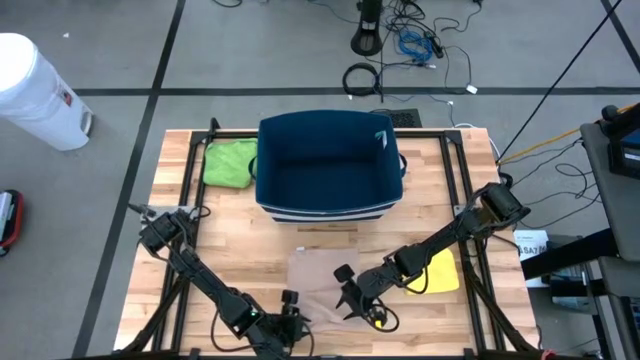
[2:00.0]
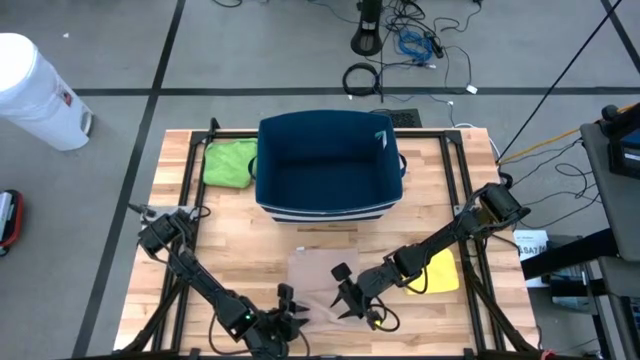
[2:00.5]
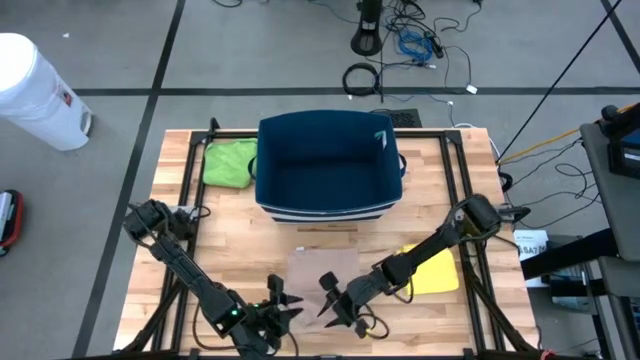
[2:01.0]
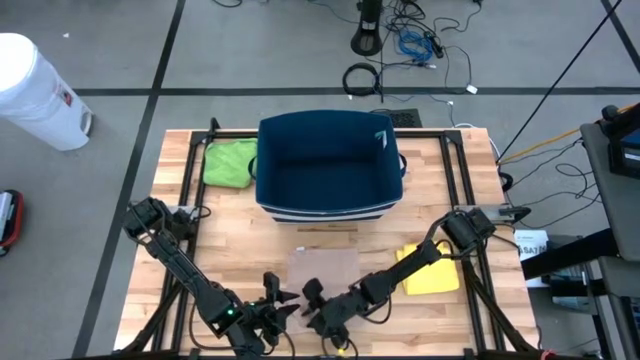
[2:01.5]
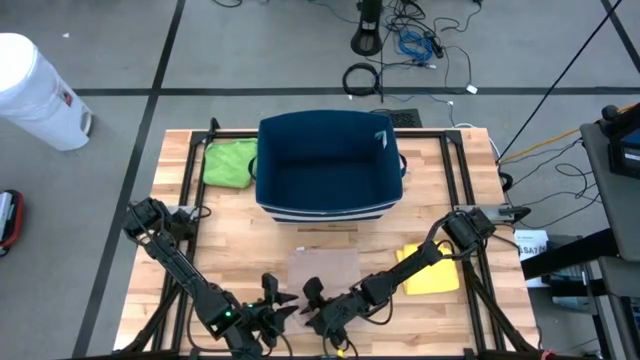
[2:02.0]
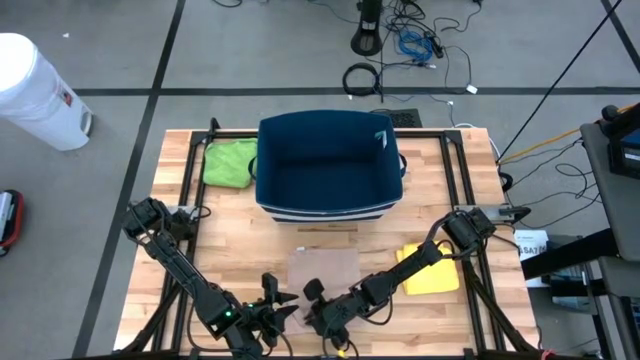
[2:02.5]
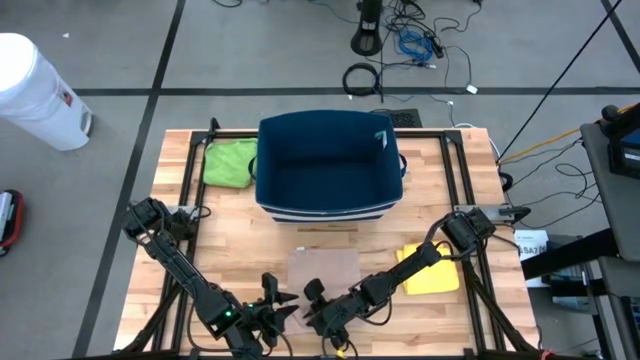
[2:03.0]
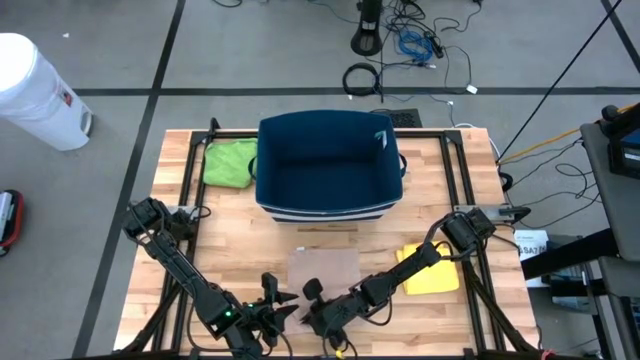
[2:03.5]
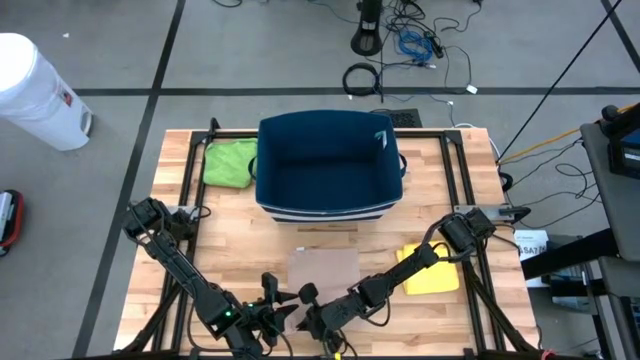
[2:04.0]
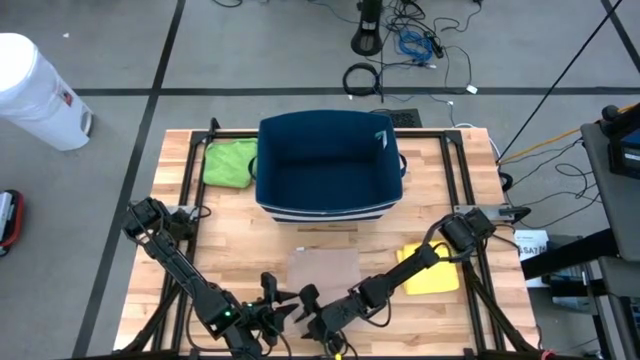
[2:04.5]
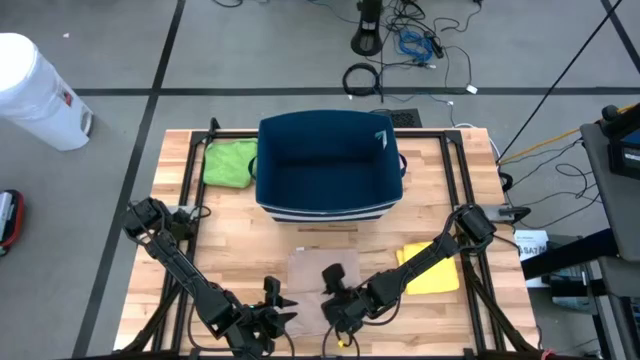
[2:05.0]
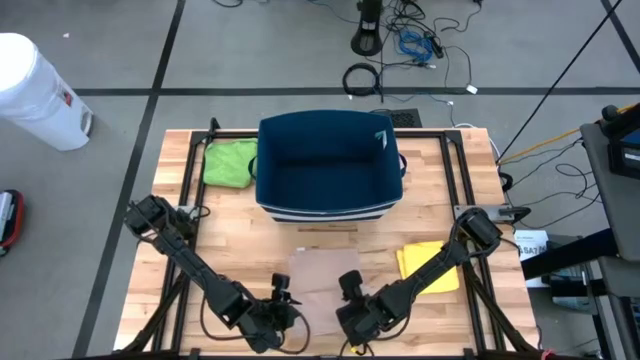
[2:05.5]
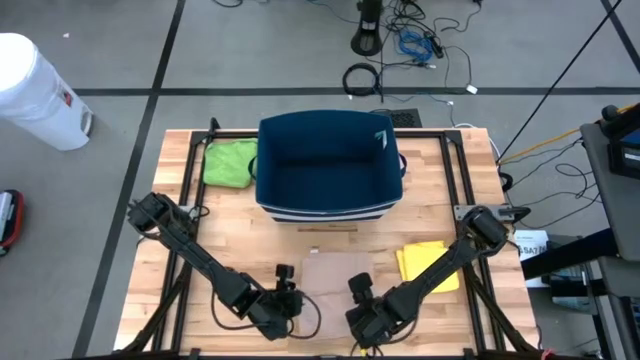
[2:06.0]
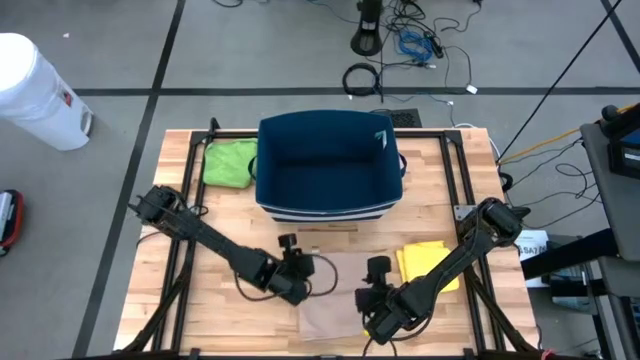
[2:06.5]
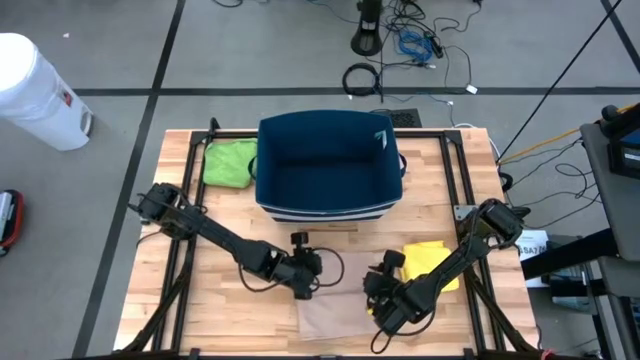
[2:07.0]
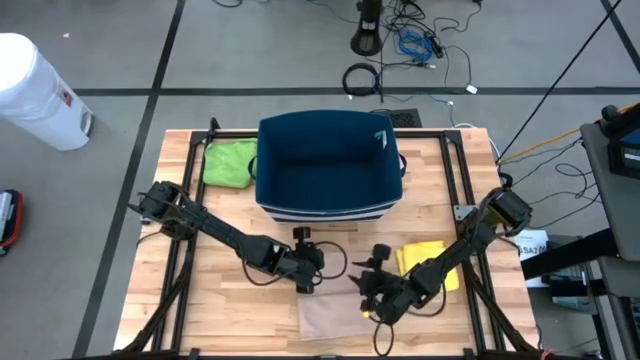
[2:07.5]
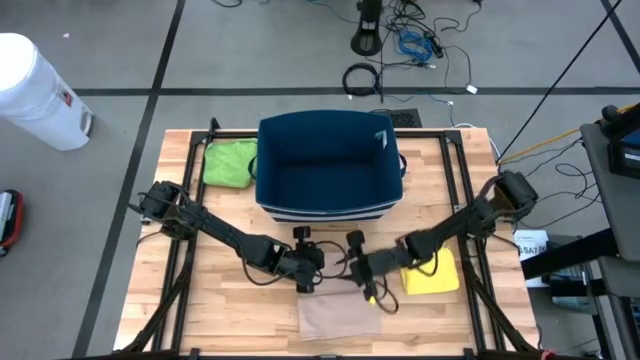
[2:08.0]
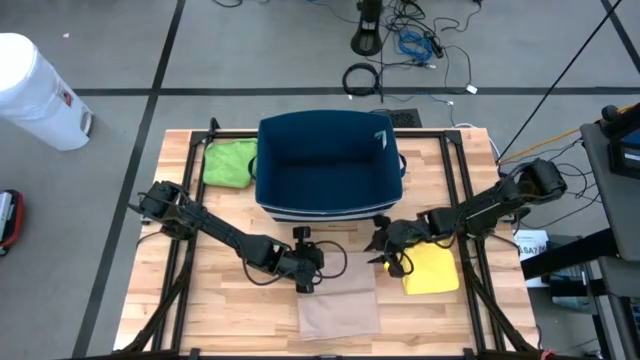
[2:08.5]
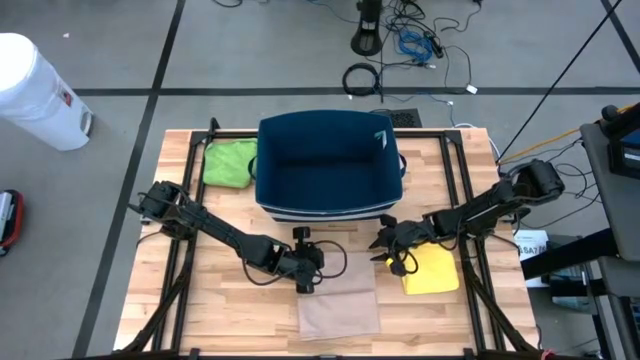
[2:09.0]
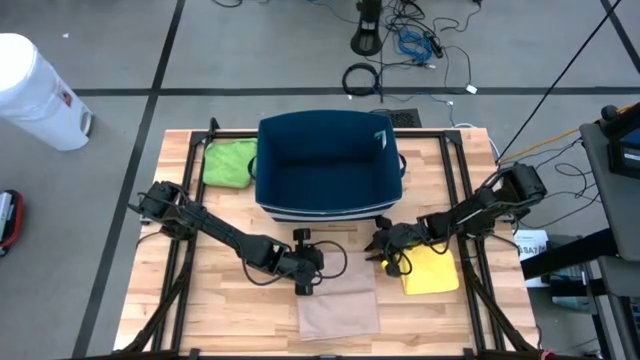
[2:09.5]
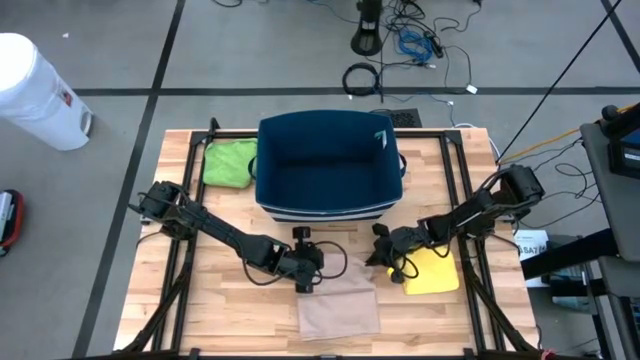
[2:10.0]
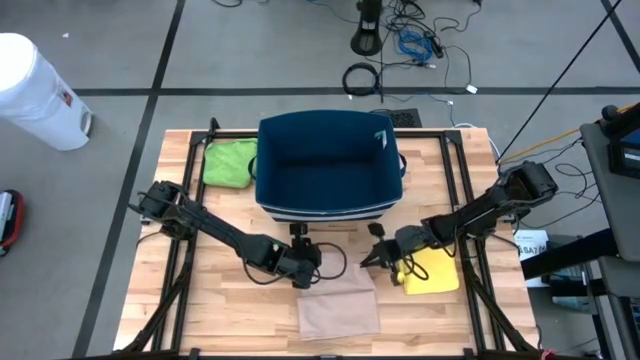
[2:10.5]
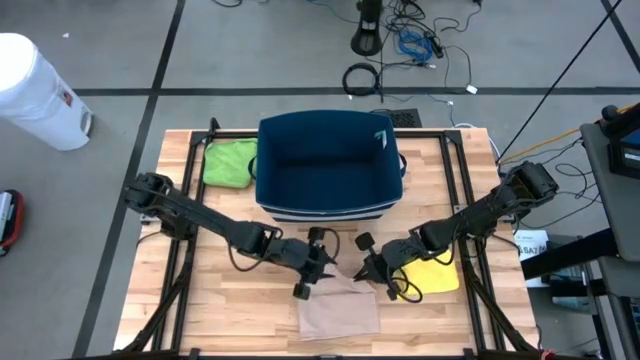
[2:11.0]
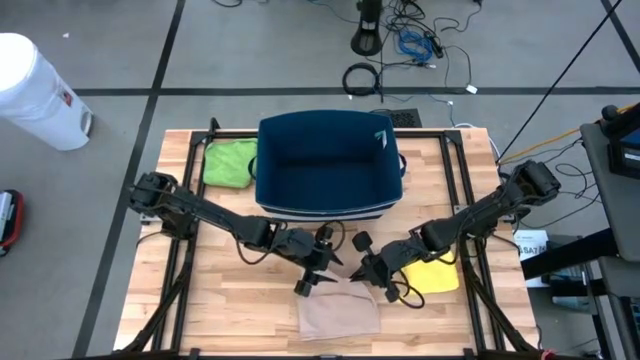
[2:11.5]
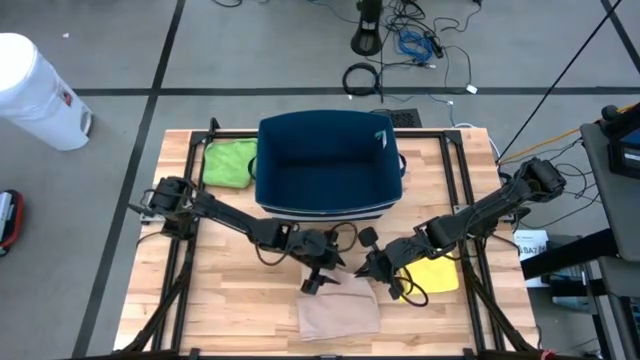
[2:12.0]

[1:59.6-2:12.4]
Task: Fold towel
Fold the light brown towel

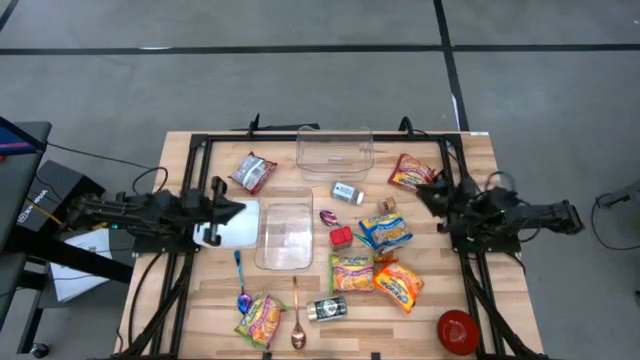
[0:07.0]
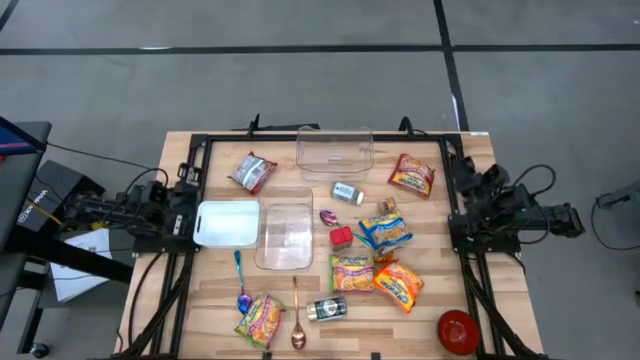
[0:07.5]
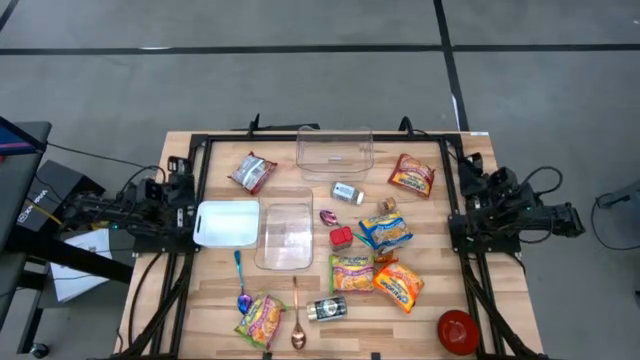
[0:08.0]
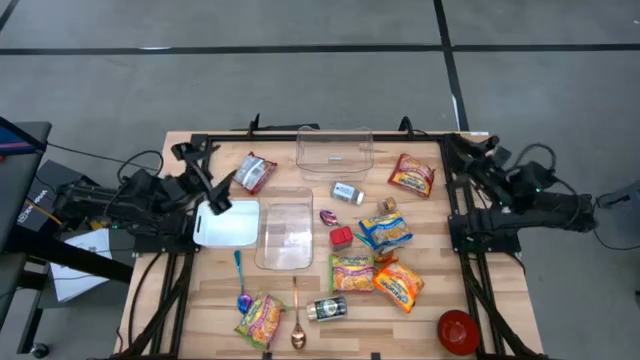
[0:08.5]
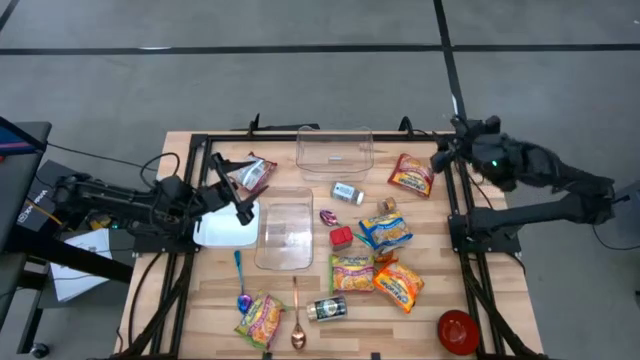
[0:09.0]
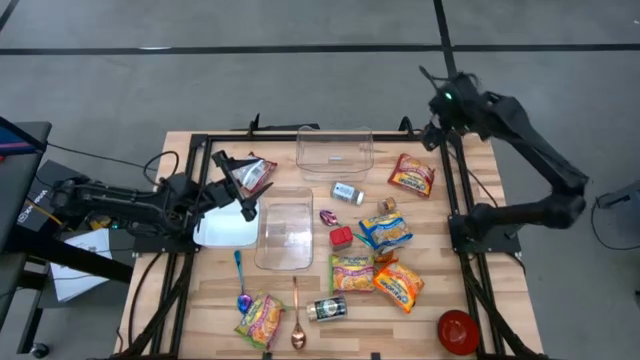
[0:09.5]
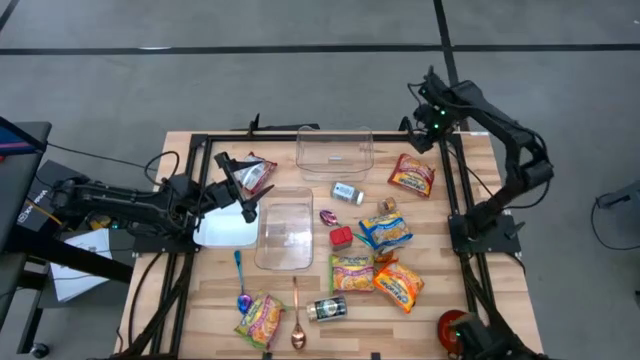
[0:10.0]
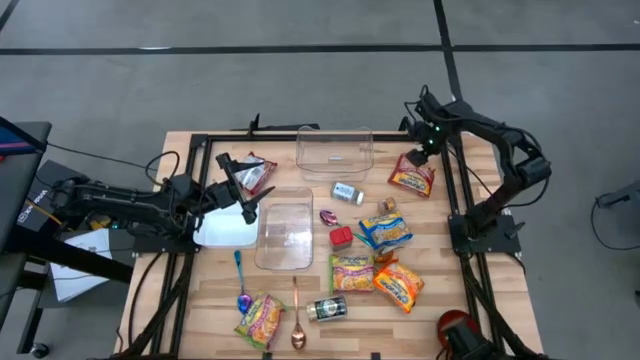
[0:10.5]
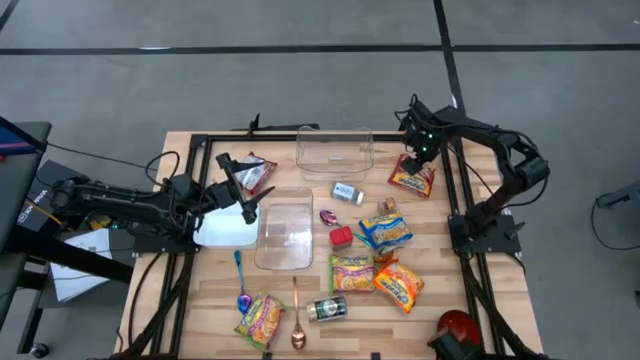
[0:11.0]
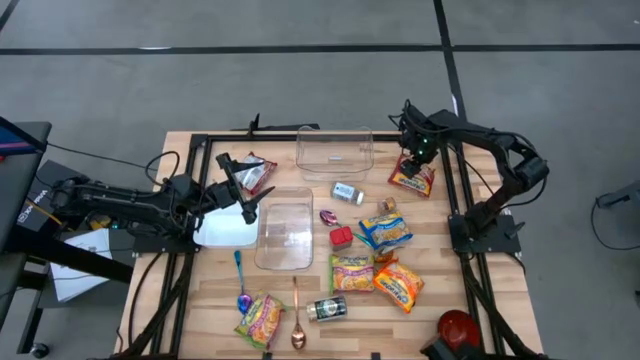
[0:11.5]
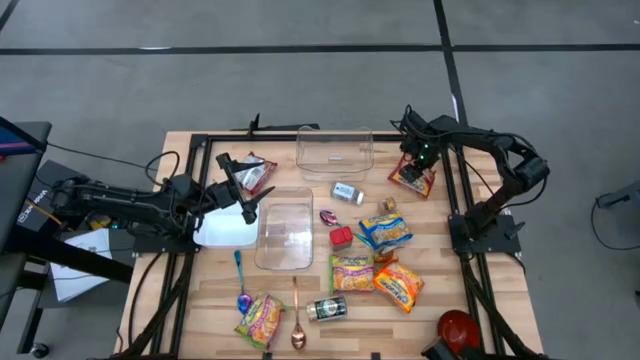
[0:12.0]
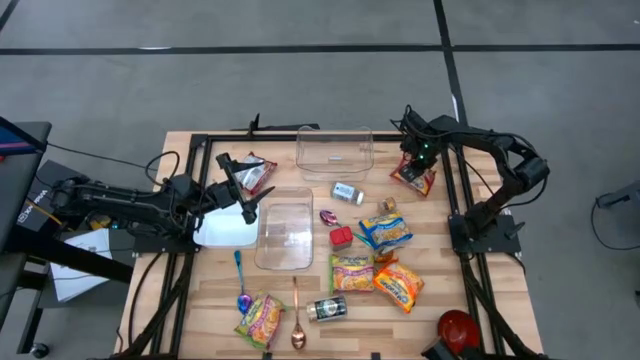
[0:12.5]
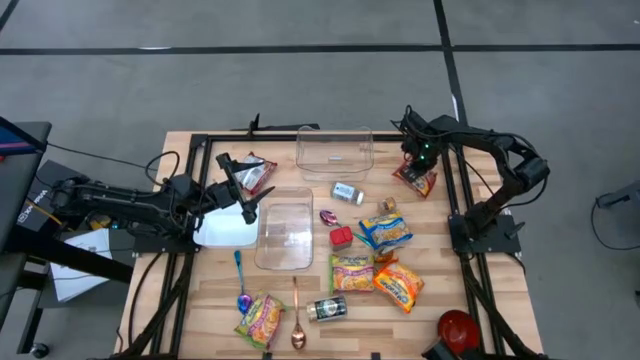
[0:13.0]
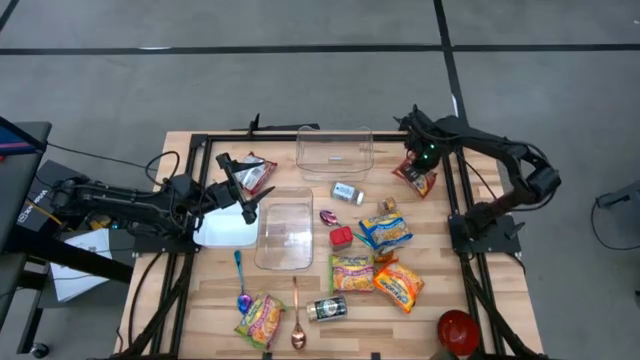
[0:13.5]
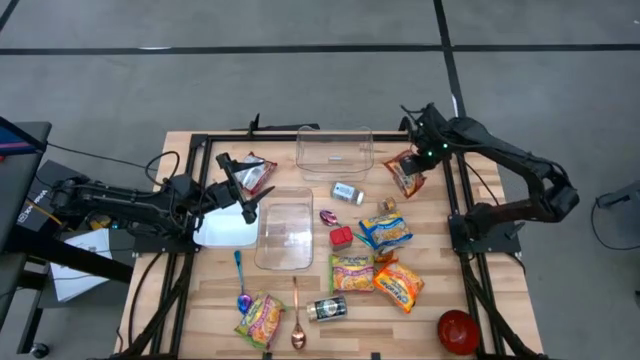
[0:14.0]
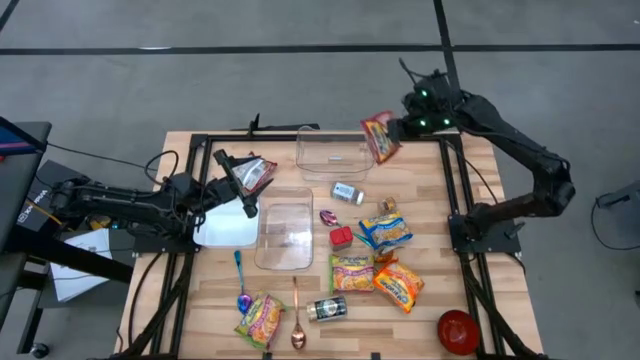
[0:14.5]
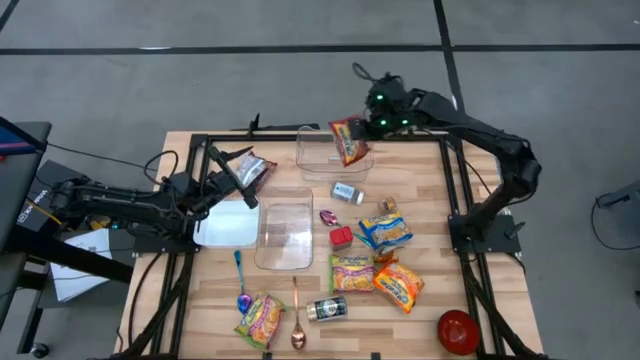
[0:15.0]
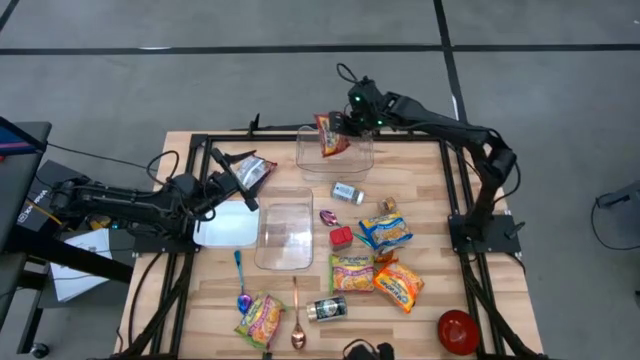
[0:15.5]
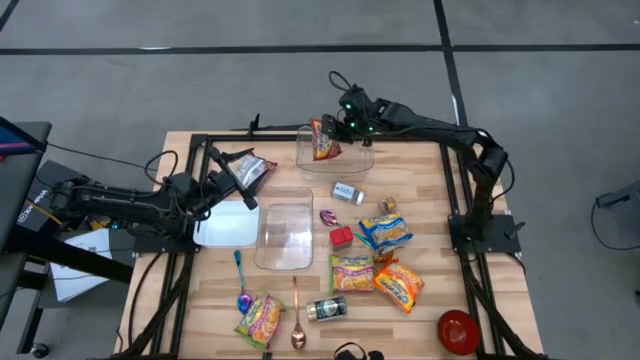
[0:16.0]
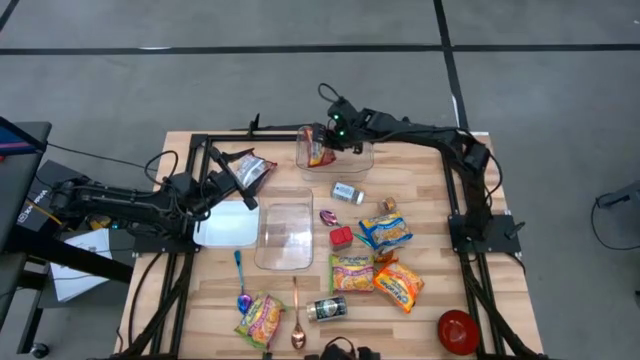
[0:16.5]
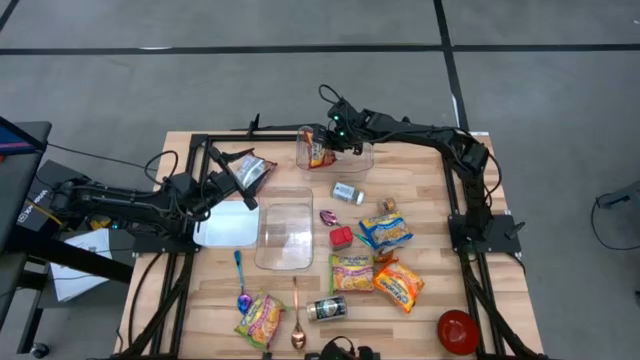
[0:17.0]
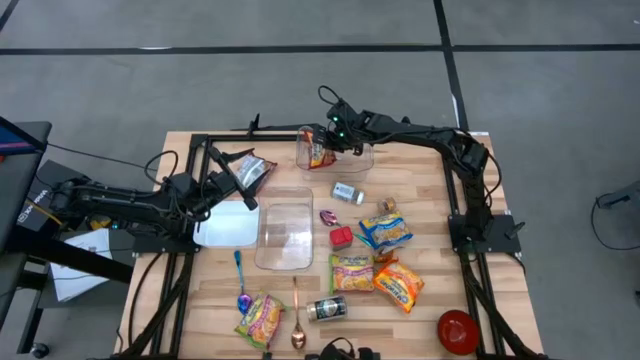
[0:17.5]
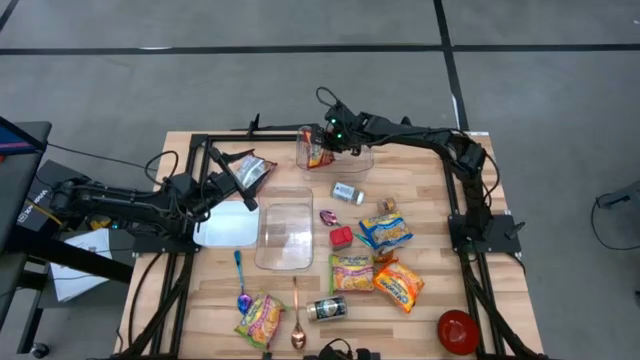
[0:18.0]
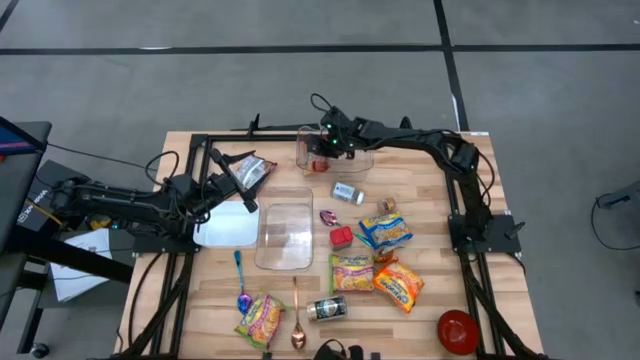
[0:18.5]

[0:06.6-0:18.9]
Task: Pick & Place Food Item
Put the right red noodle pack into the top transparent bin
